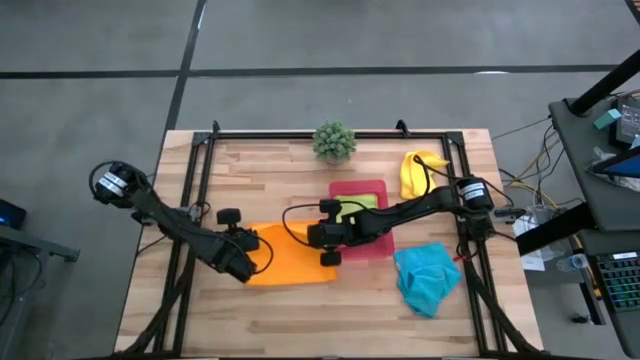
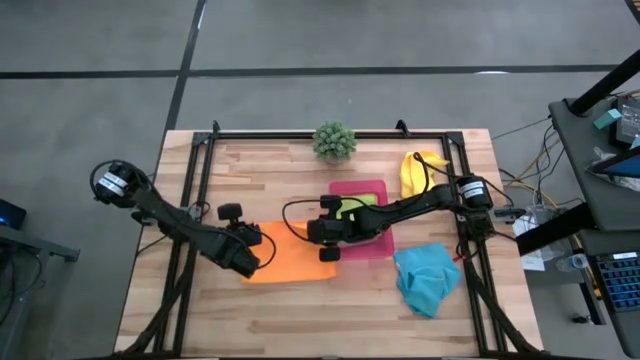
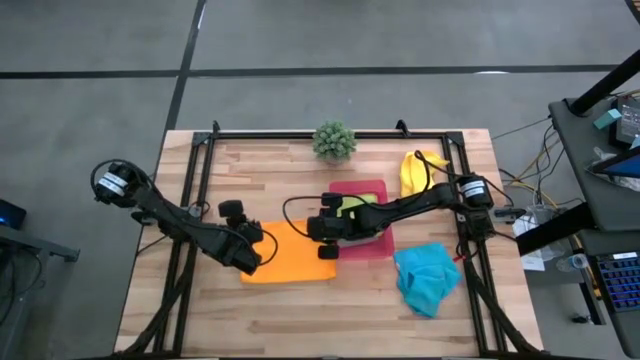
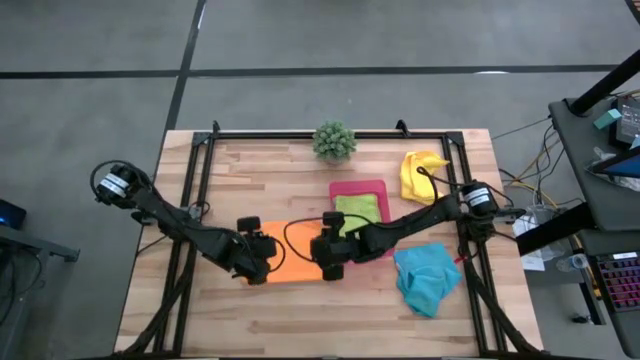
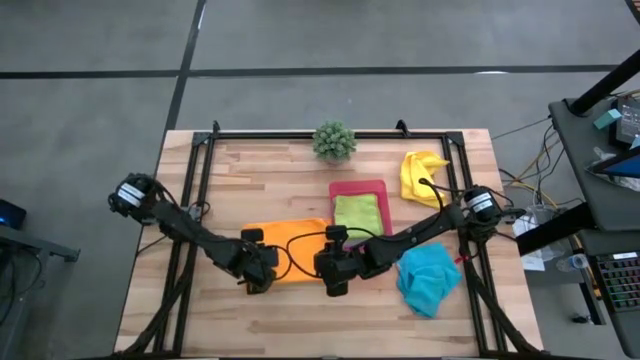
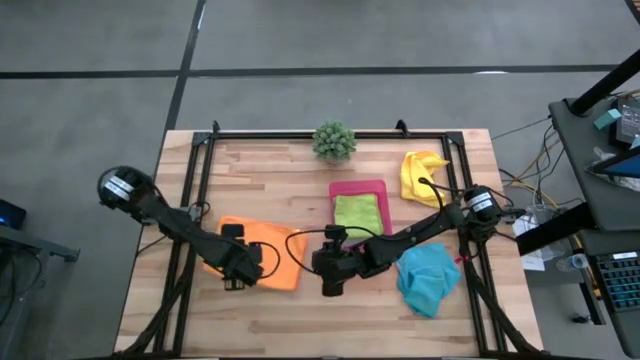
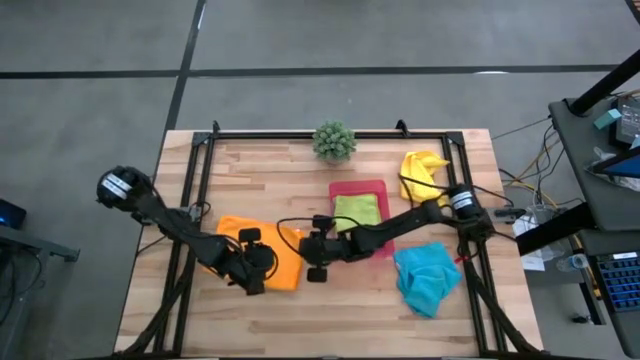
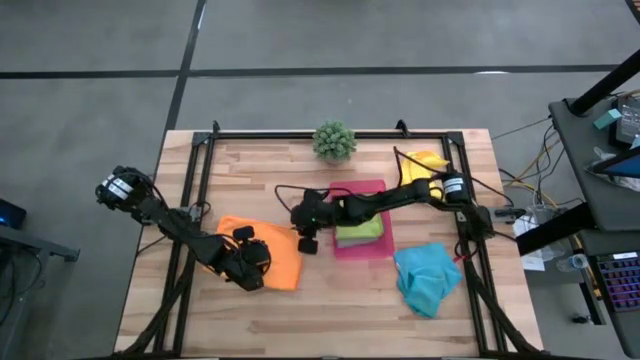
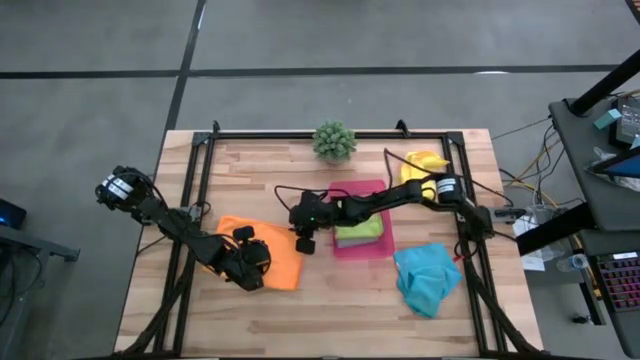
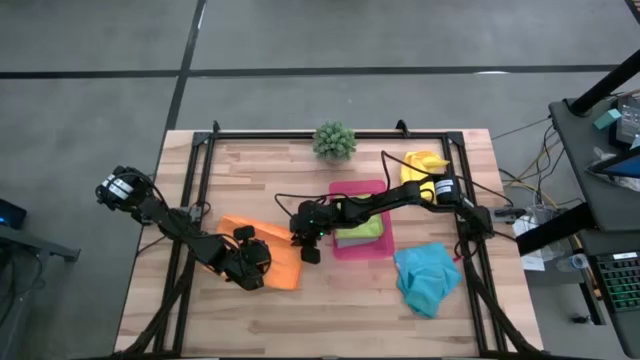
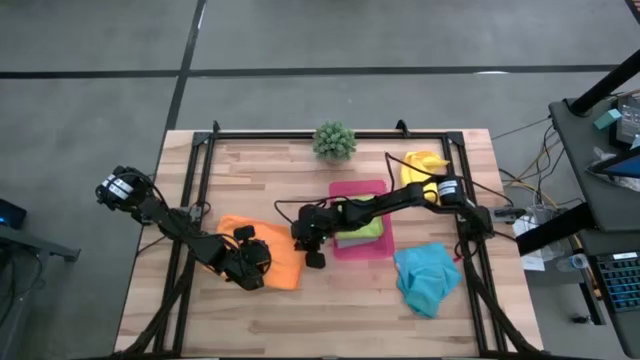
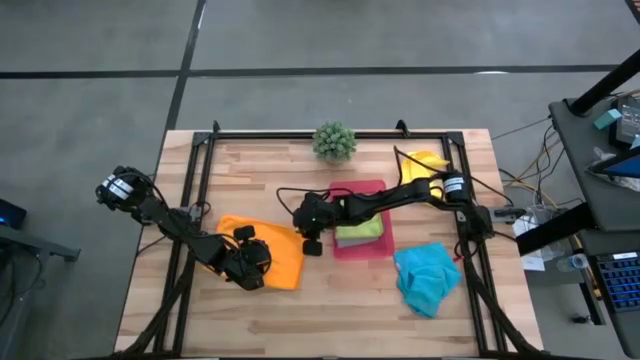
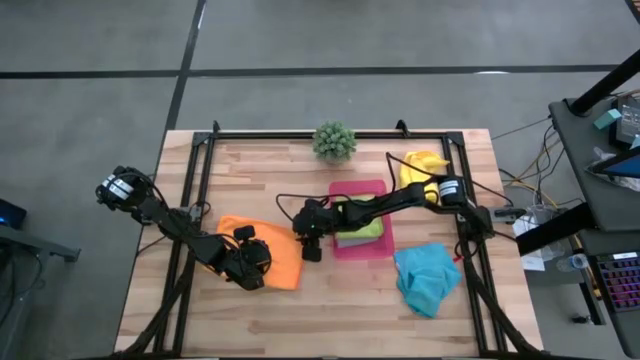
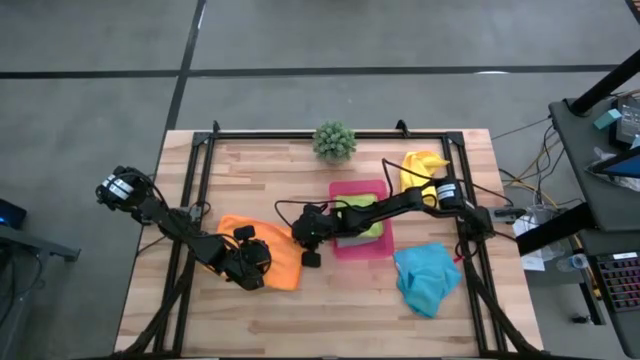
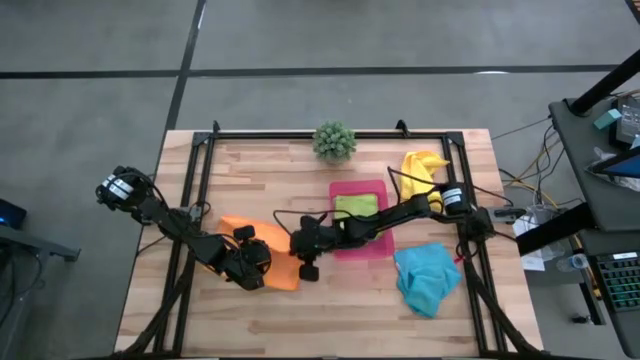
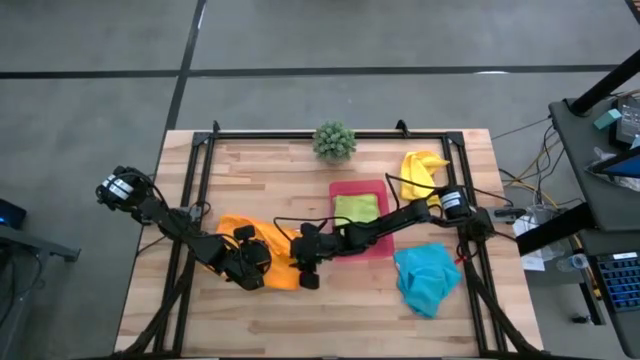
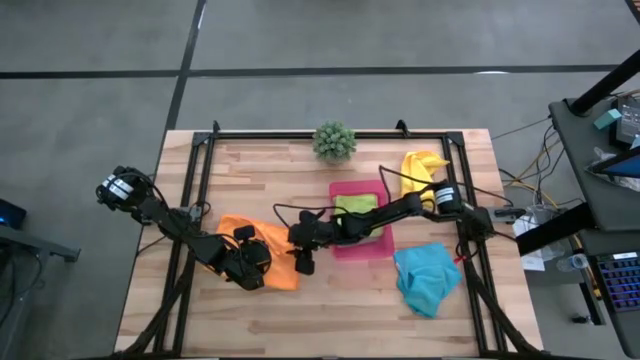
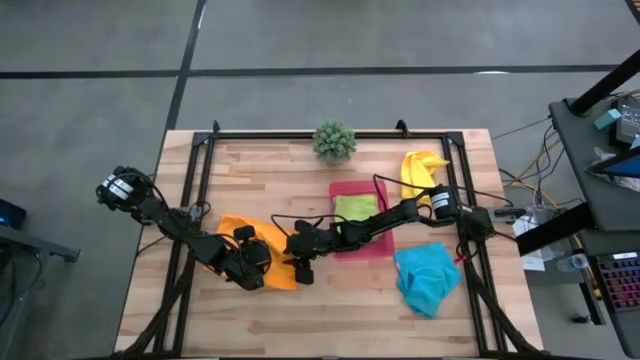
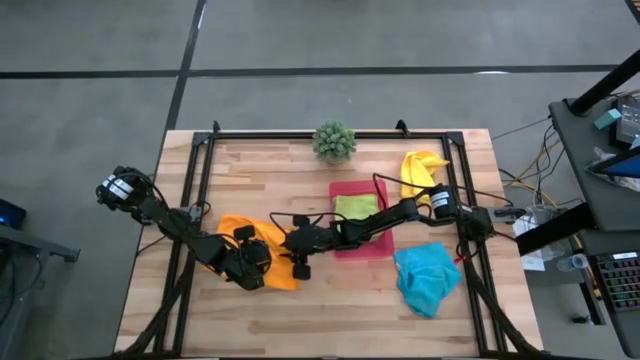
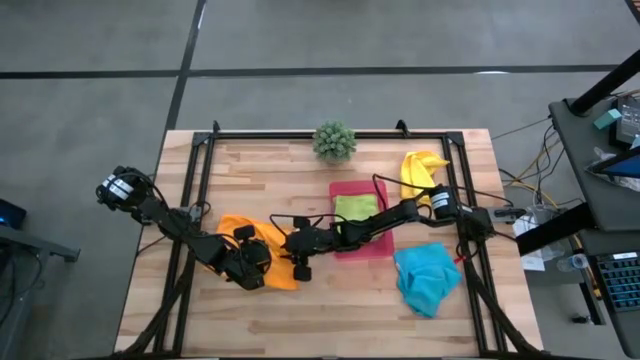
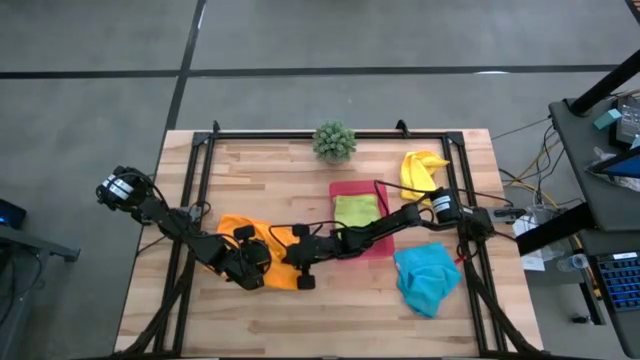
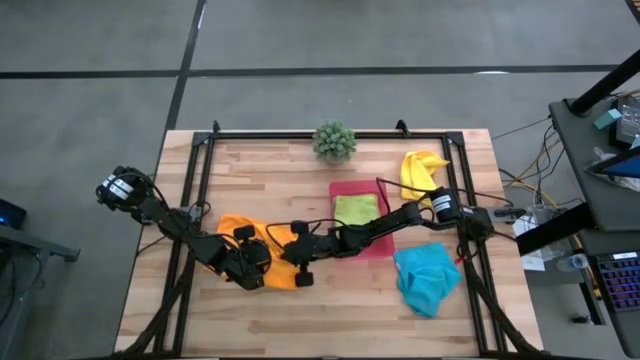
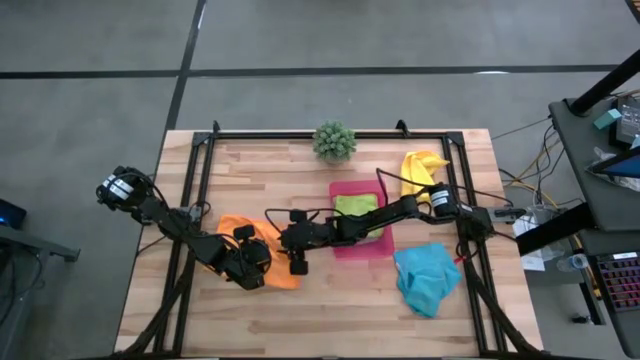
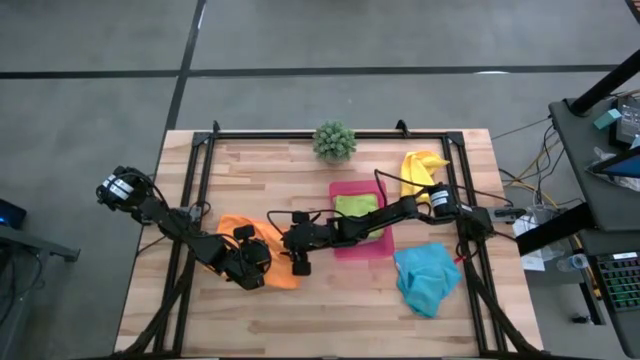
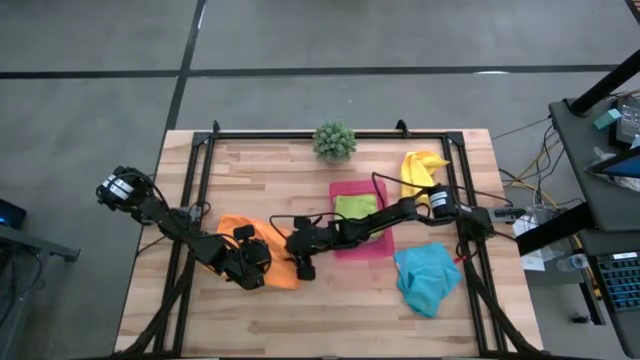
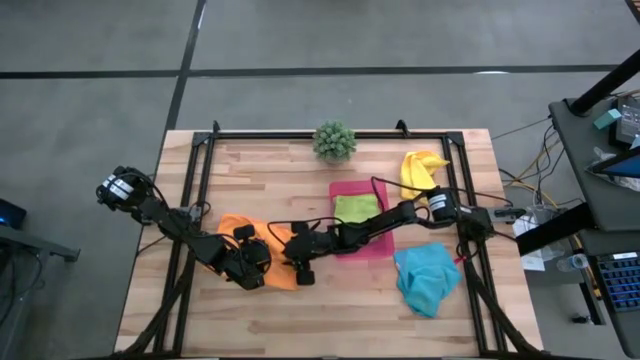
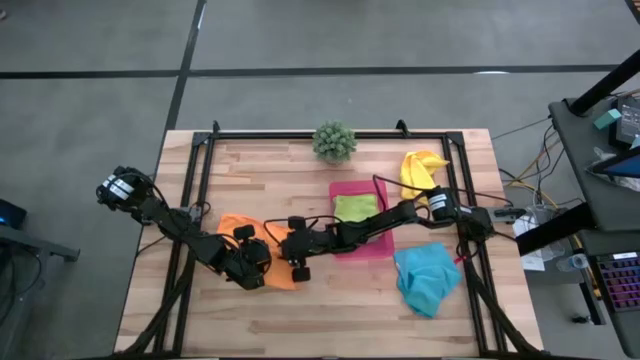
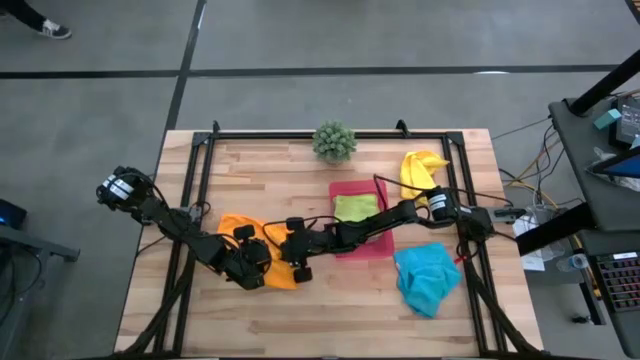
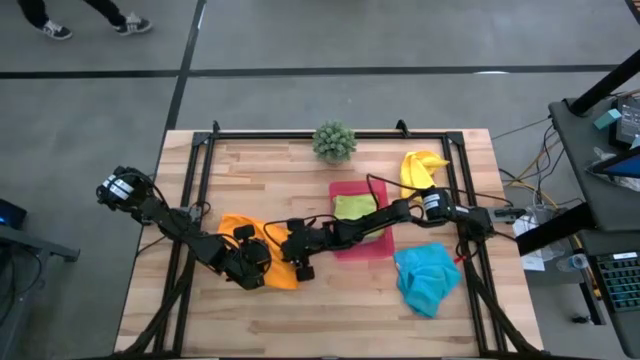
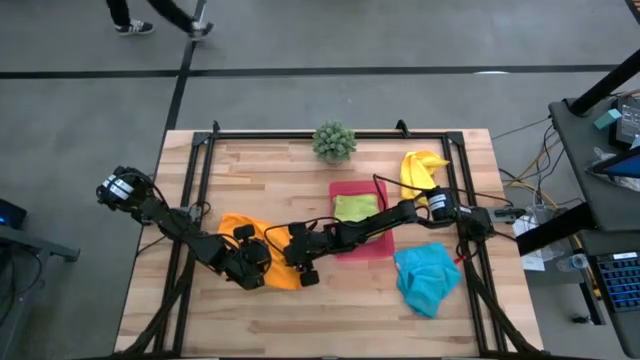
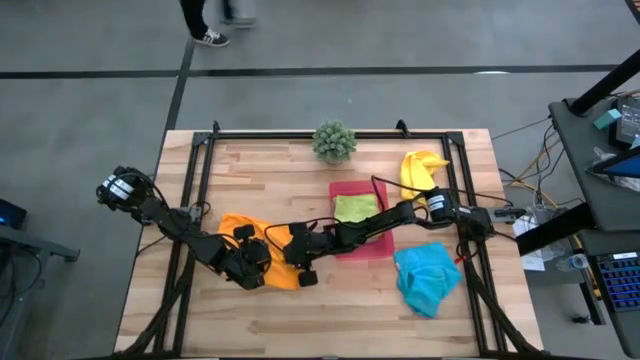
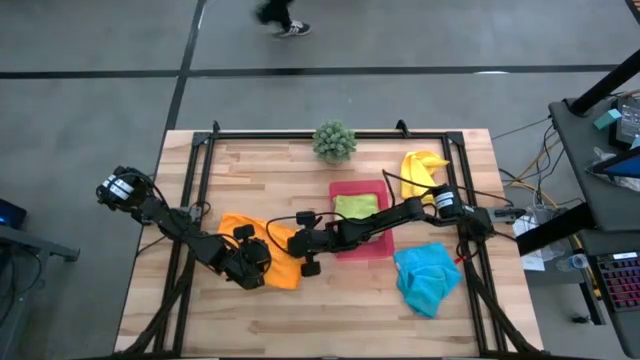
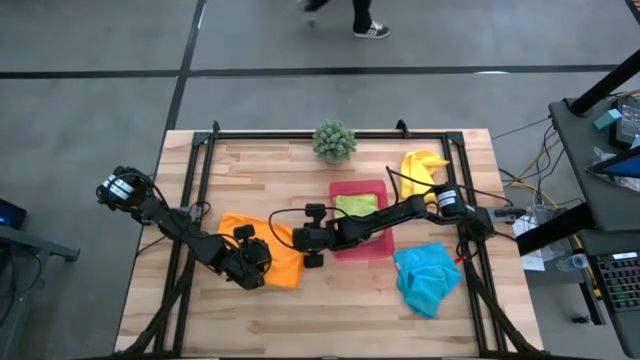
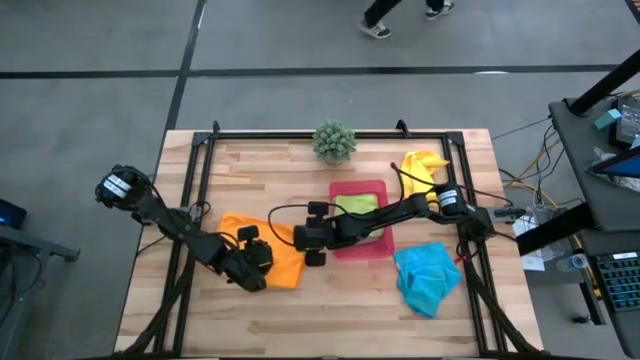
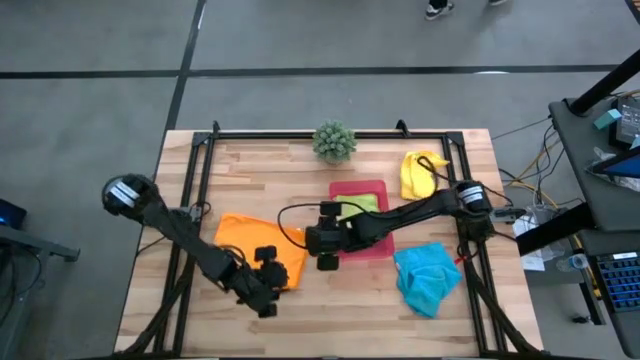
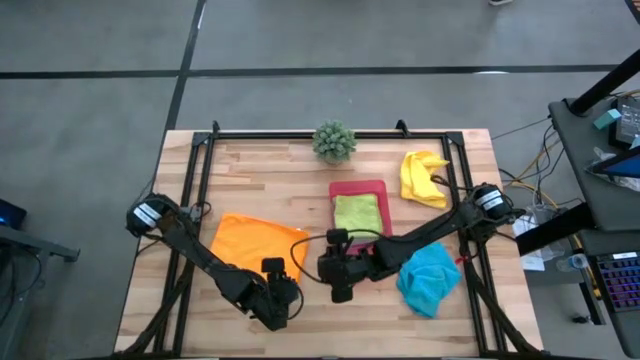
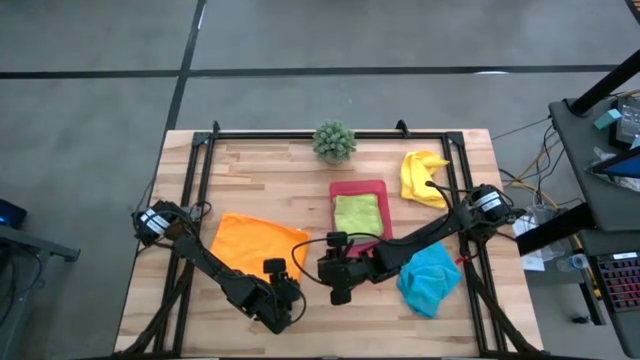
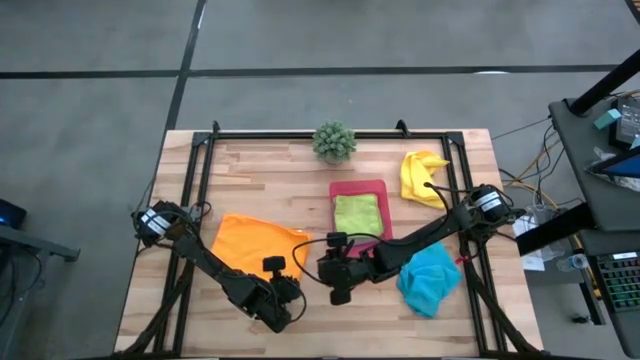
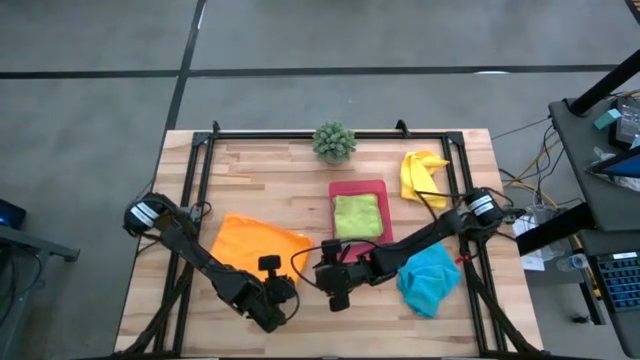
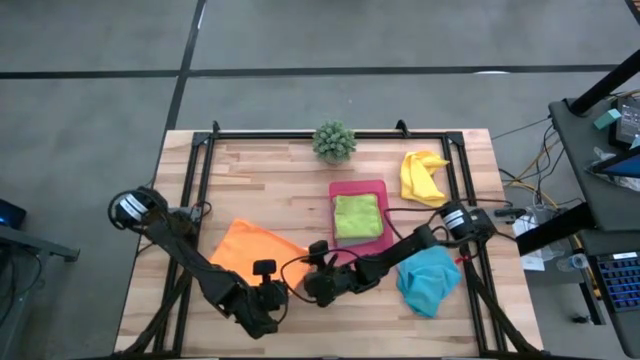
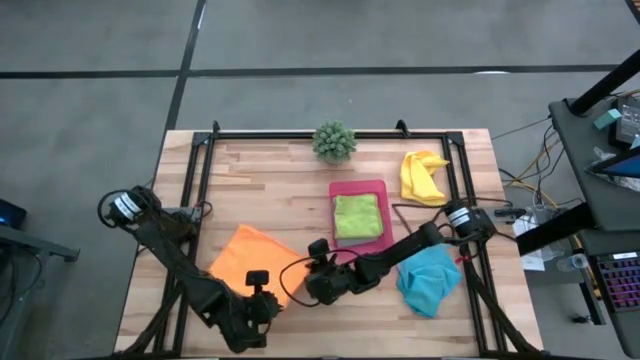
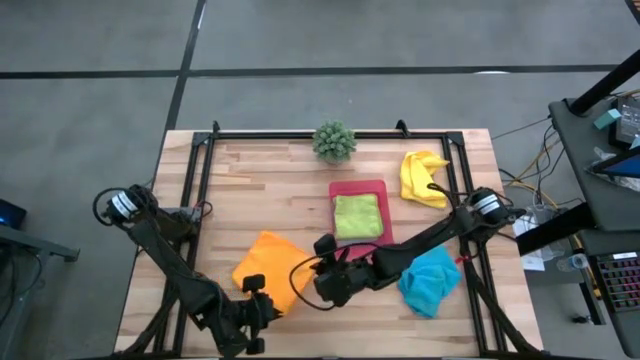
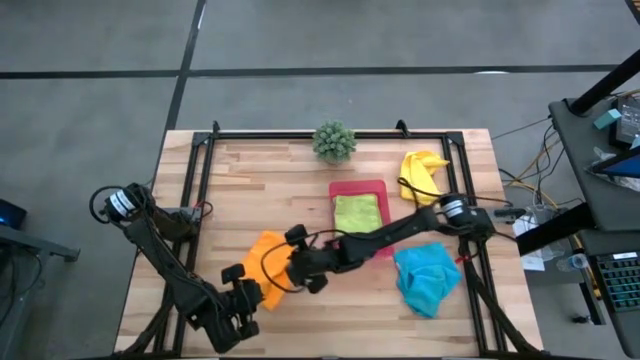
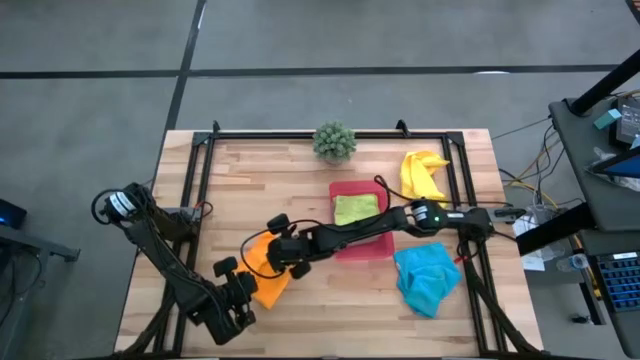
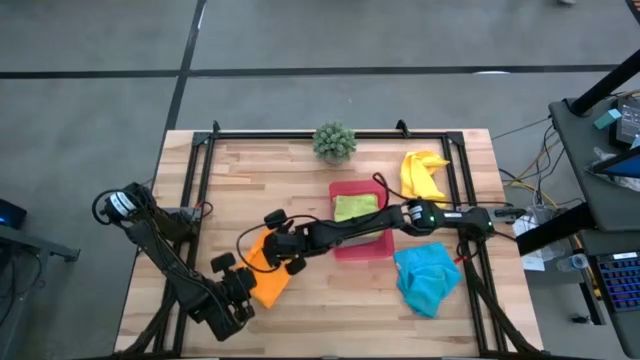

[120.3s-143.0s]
Task: Fold microfiber towels
Fold the orange towel
